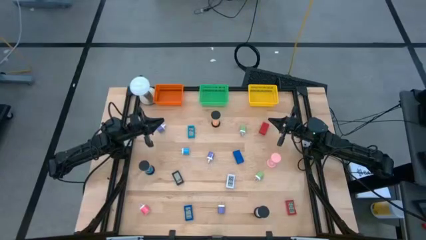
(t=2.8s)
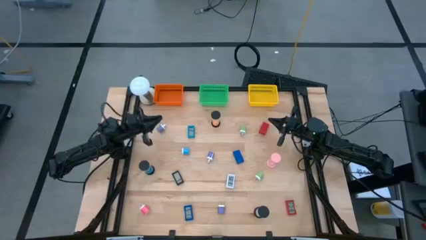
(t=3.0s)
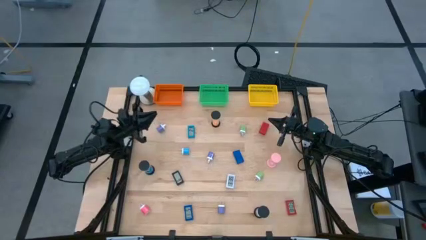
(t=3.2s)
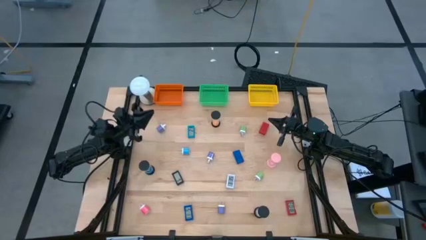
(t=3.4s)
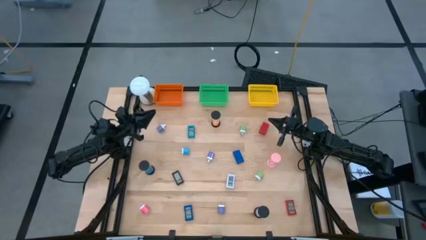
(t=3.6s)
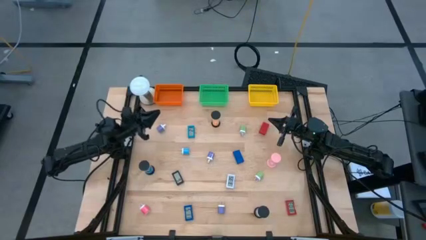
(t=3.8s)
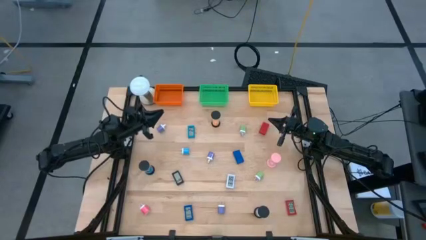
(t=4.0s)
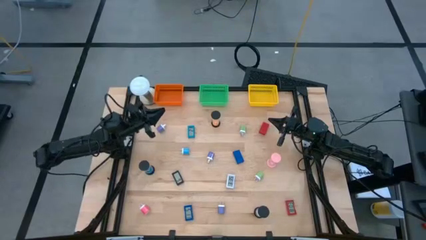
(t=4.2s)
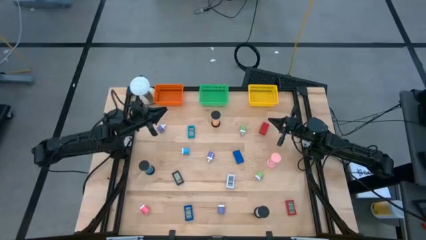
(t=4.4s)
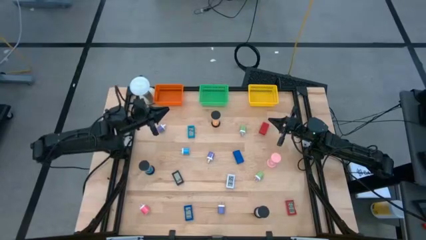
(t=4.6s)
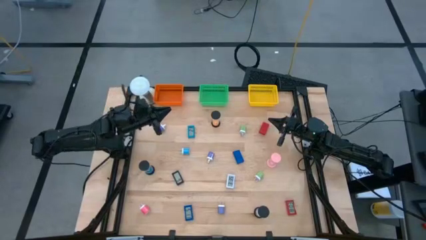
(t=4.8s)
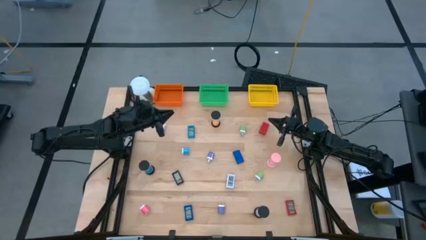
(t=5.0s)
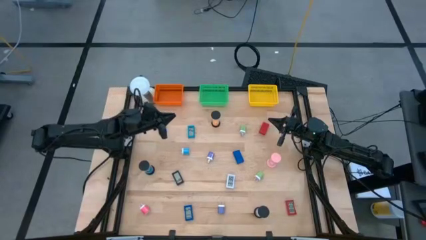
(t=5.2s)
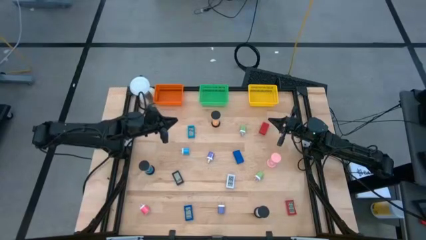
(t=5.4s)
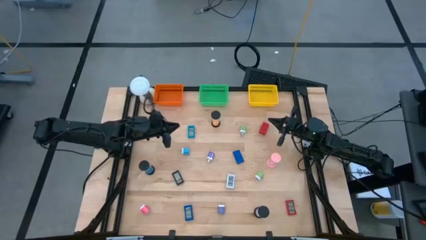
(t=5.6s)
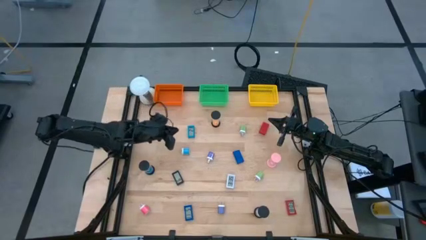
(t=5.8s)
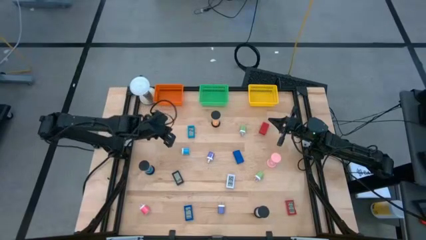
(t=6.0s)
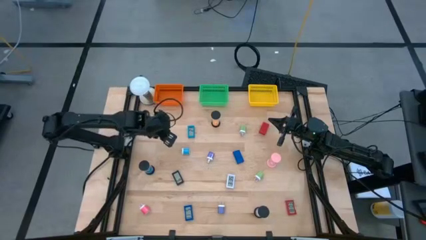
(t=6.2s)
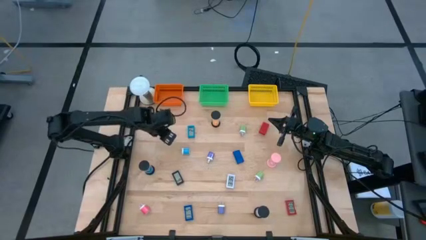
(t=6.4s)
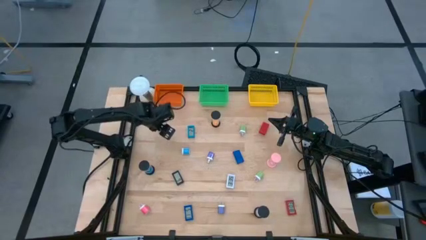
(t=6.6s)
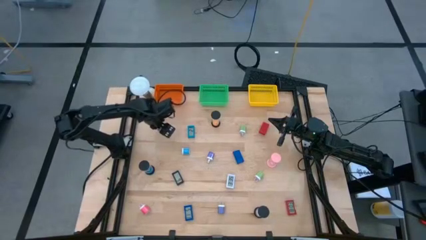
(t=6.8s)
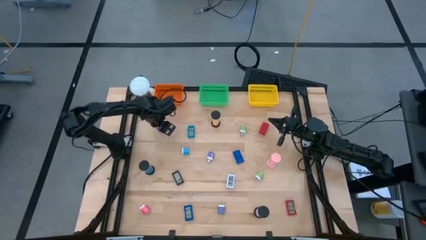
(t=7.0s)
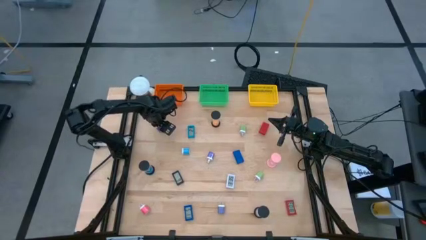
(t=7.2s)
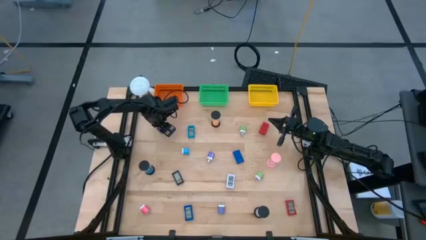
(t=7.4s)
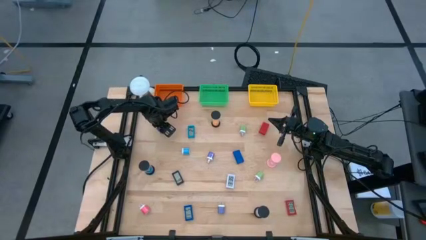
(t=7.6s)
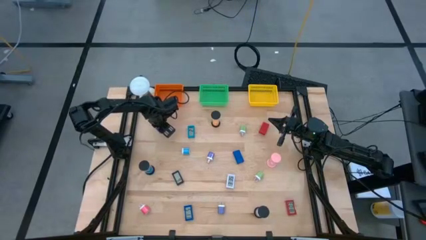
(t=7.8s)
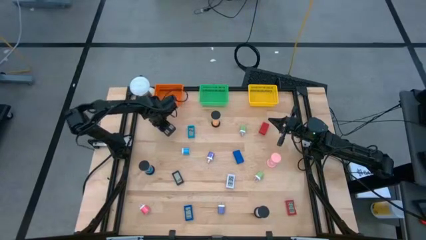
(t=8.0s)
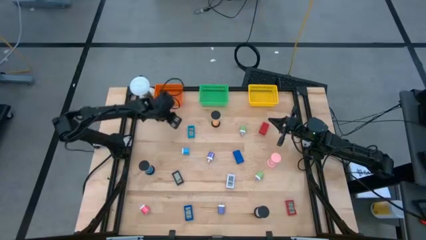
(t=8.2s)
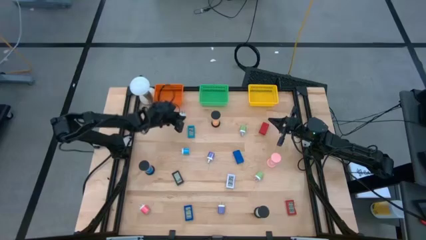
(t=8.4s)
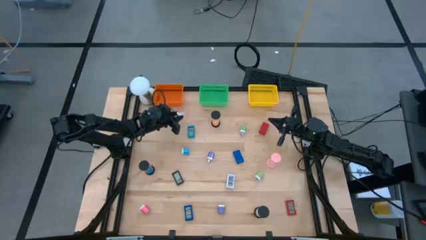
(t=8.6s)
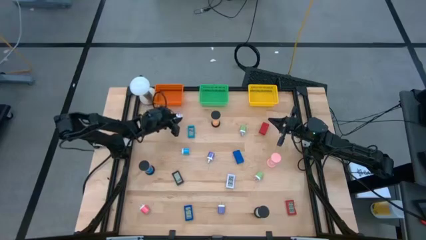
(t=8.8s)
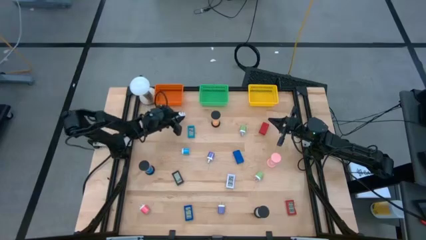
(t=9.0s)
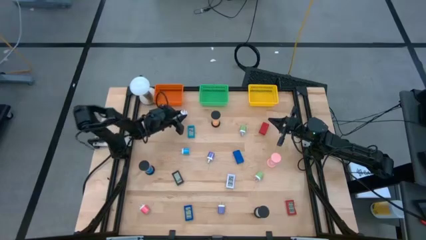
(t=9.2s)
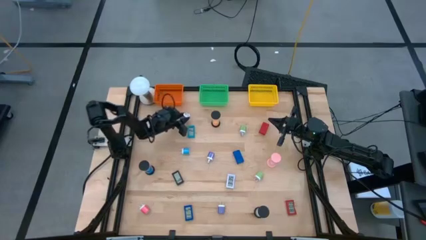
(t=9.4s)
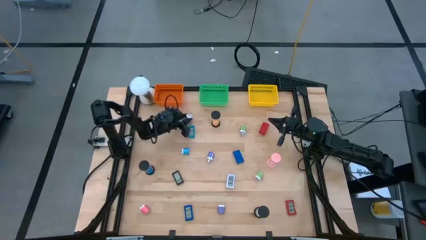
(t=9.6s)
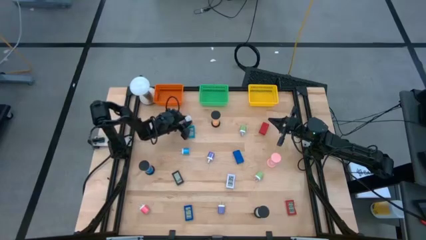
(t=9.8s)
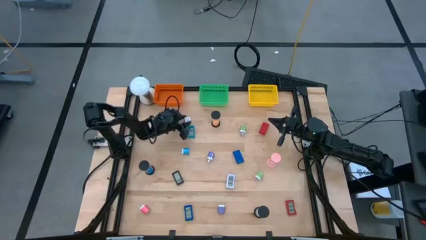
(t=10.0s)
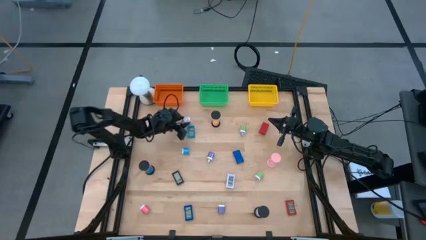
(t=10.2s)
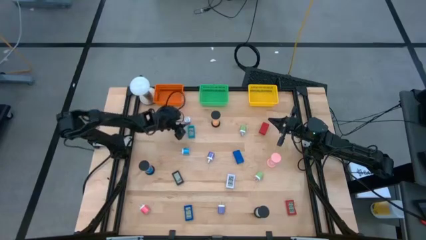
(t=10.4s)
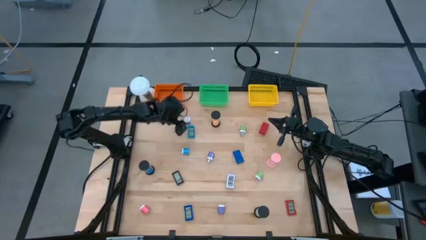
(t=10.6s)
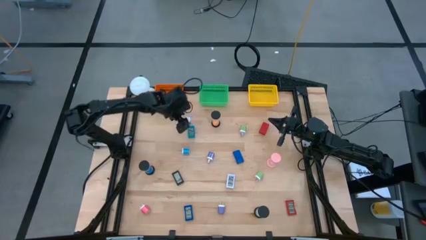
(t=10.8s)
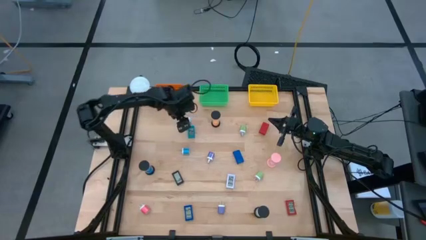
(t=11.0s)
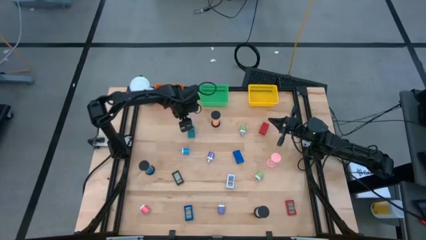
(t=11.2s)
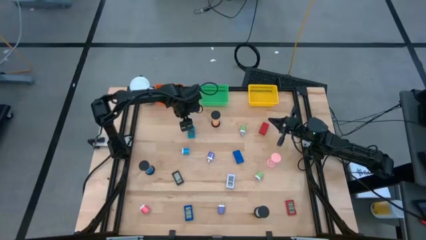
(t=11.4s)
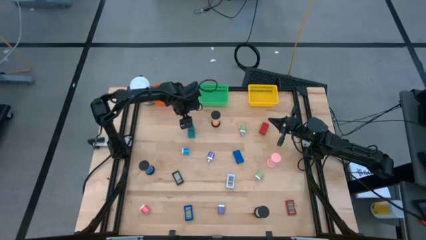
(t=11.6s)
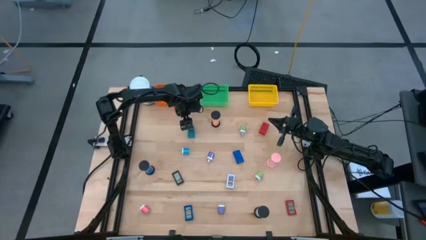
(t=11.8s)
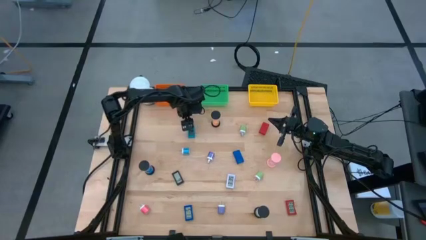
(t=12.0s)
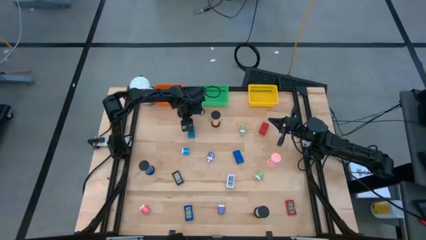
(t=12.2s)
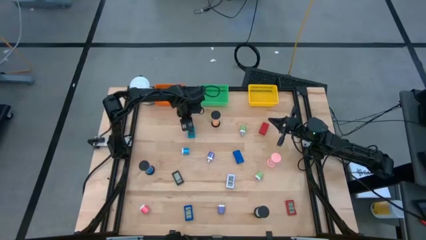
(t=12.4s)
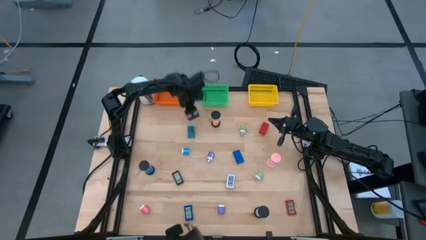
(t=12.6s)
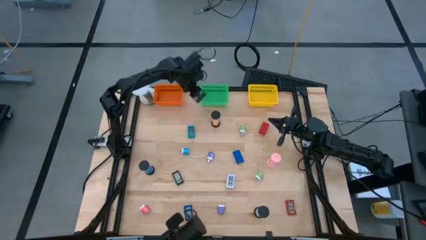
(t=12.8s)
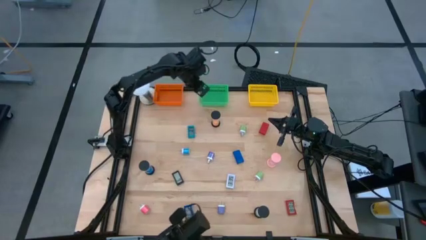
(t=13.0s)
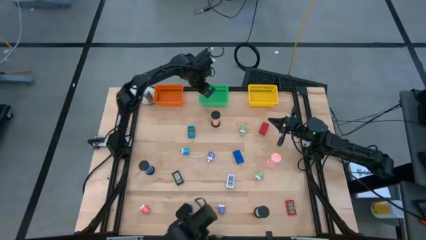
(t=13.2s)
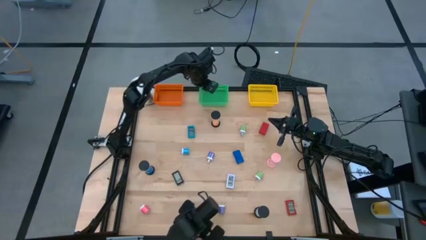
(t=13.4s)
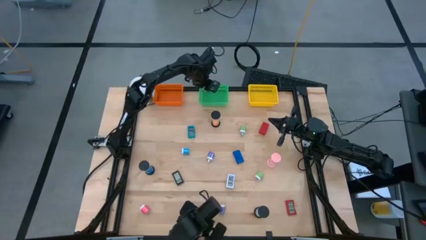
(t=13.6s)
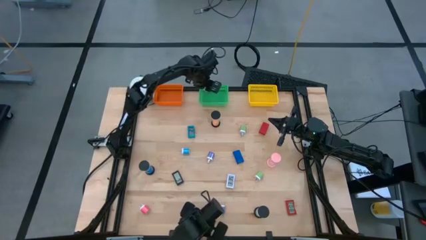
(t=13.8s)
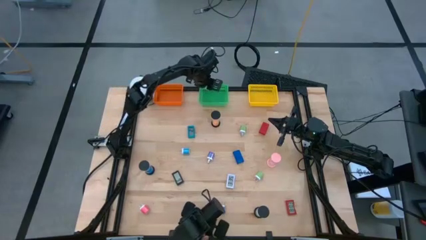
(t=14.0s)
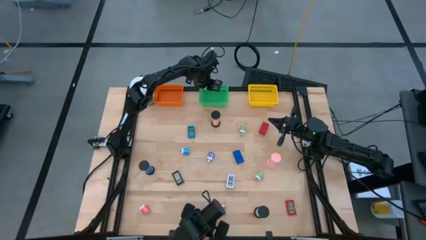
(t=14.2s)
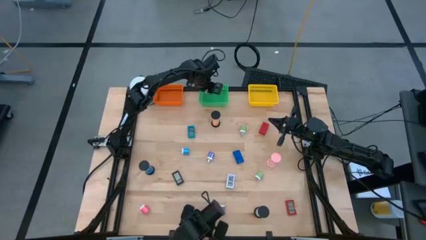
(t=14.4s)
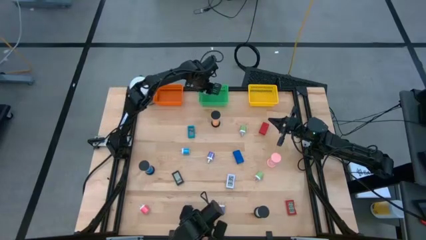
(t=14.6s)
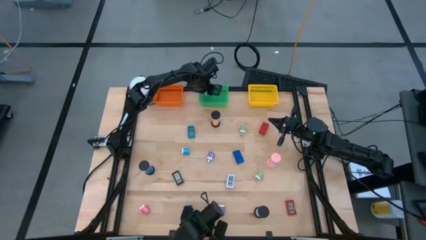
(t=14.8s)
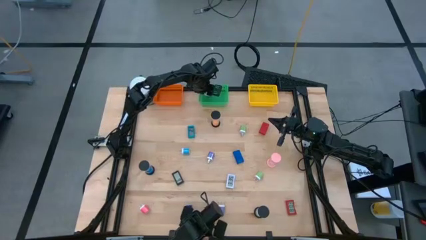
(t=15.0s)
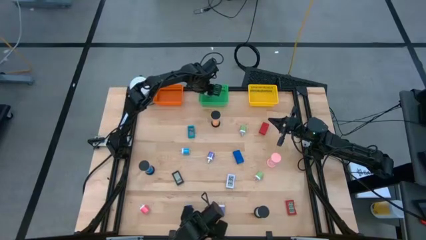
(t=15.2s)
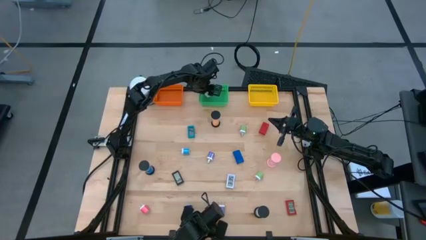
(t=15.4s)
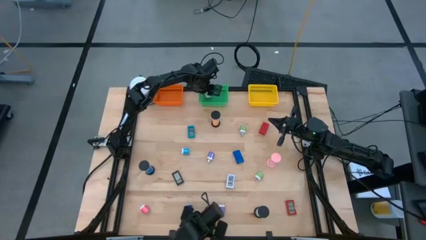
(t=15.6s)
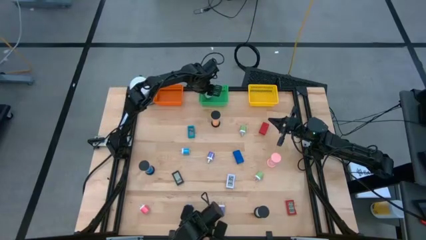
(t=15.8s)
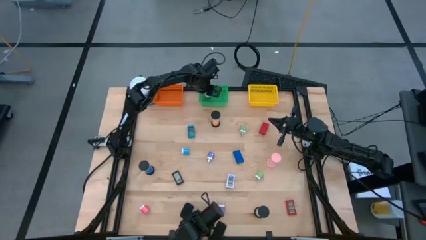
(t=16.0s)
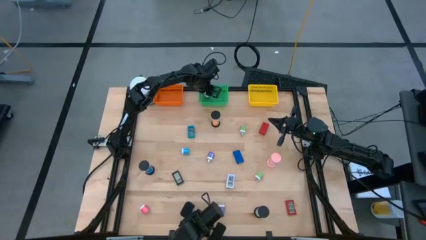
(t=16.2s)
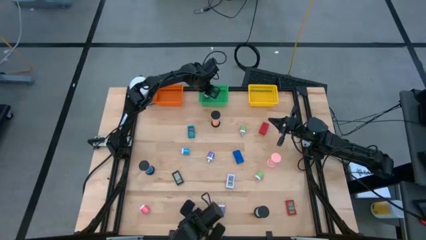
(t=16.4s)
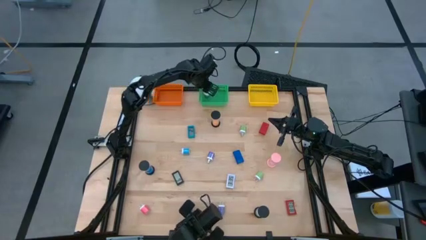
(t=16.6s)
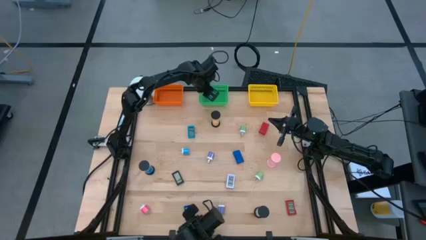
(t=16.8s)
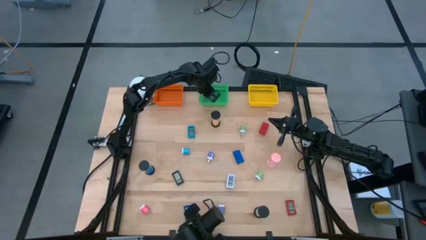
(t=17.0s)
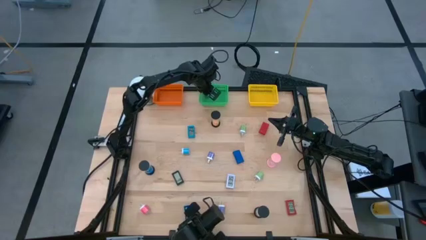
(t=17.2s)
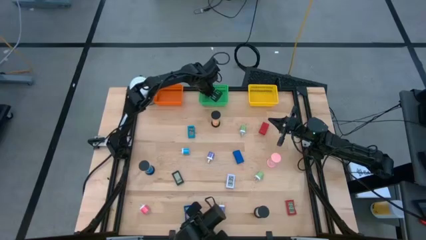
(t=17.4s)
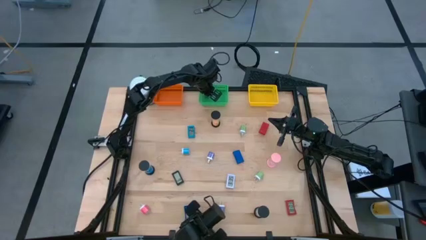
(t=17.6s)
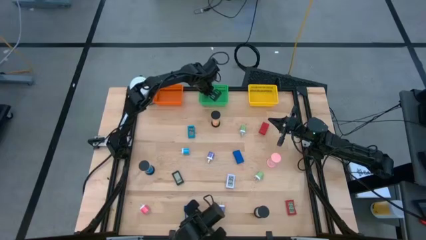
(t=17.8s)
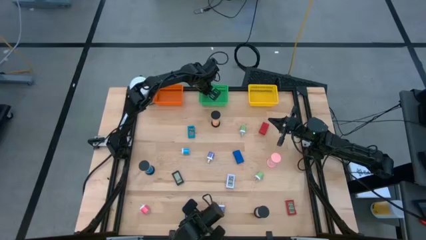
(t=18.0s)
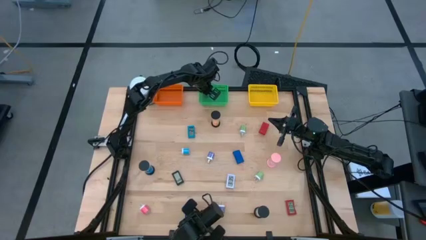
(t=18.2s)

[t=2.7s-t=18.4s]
Task: Pick & Place Office items
Put the blue charger adapter into the green basket
